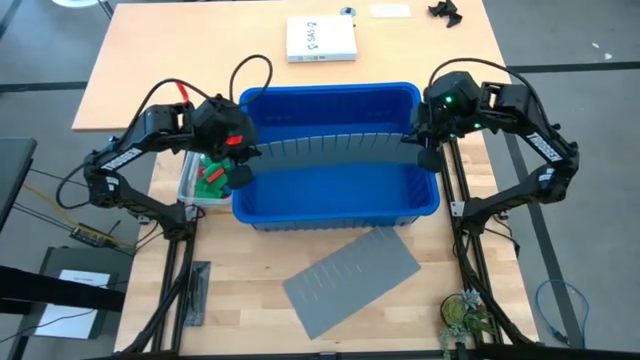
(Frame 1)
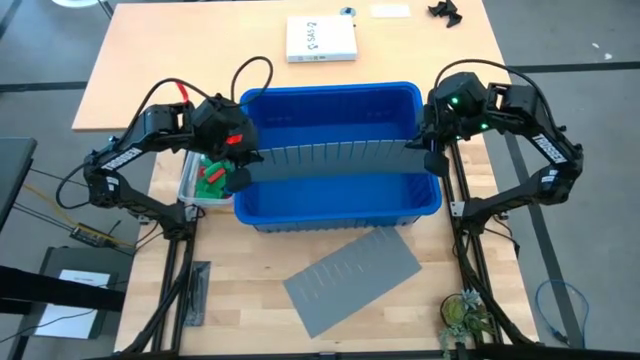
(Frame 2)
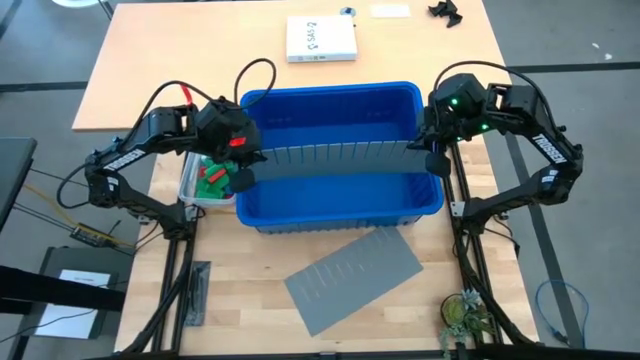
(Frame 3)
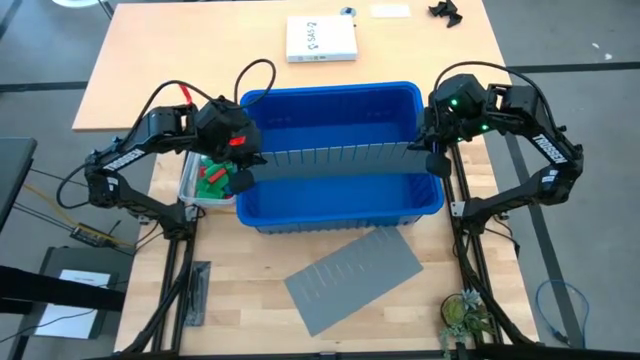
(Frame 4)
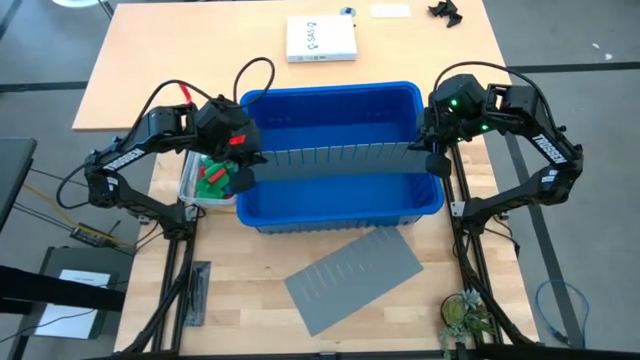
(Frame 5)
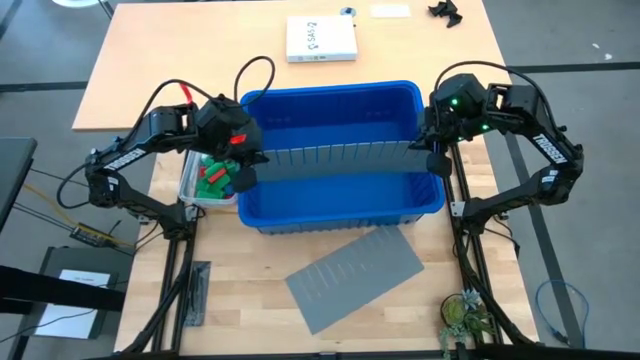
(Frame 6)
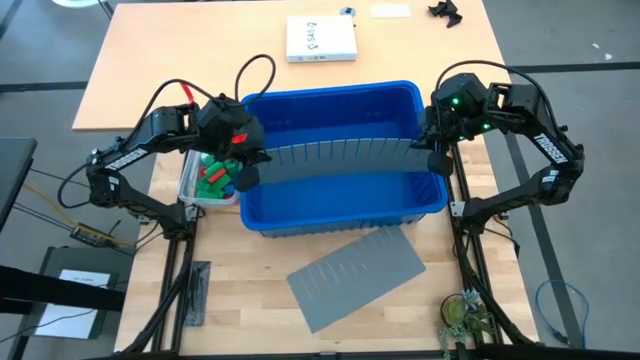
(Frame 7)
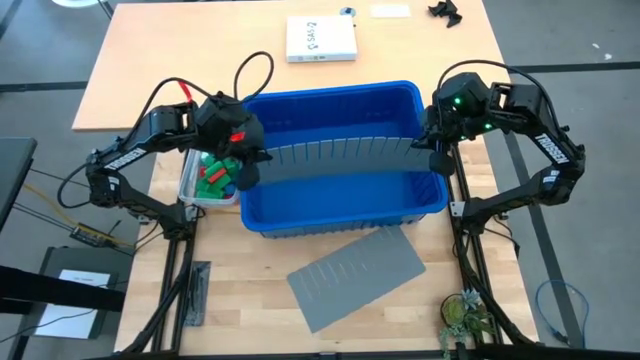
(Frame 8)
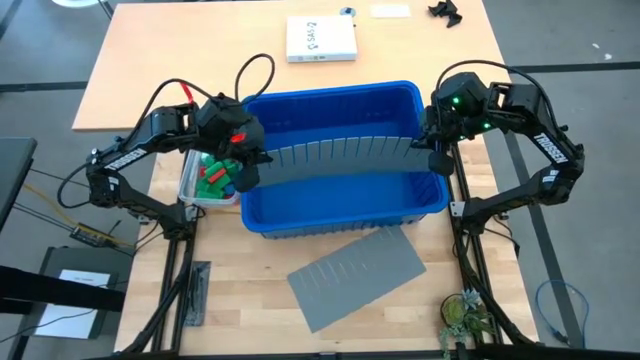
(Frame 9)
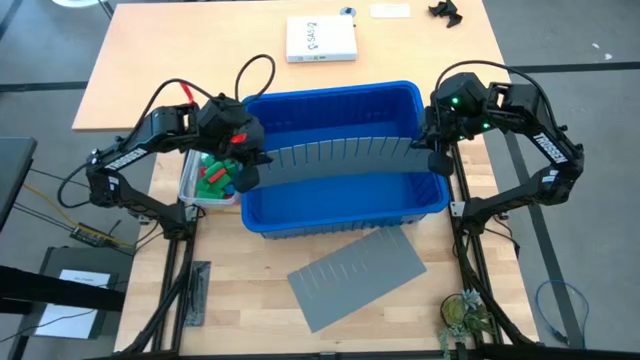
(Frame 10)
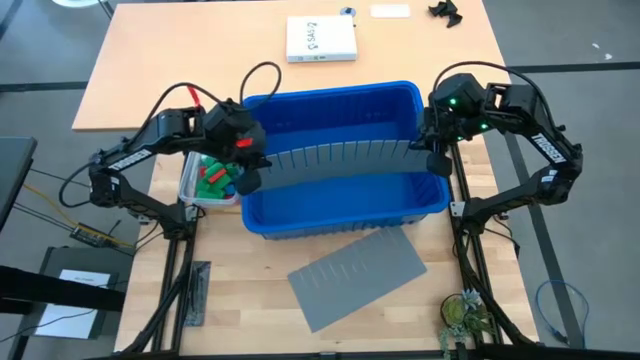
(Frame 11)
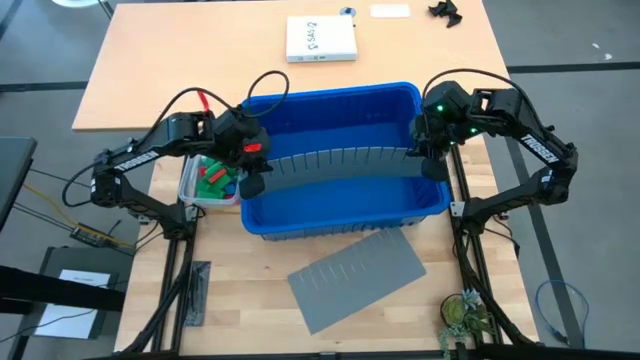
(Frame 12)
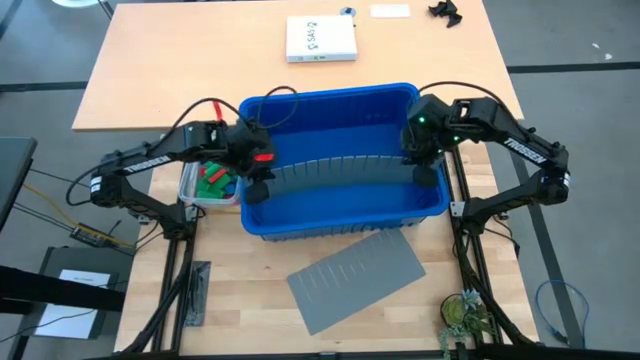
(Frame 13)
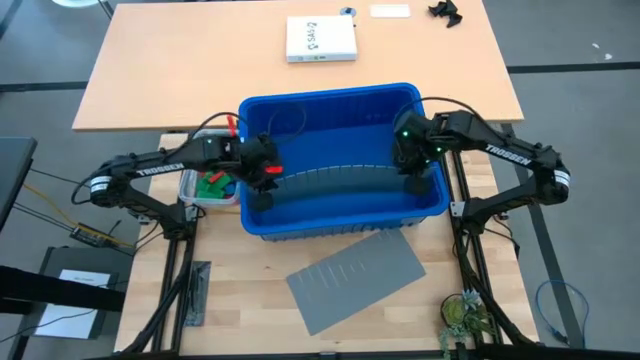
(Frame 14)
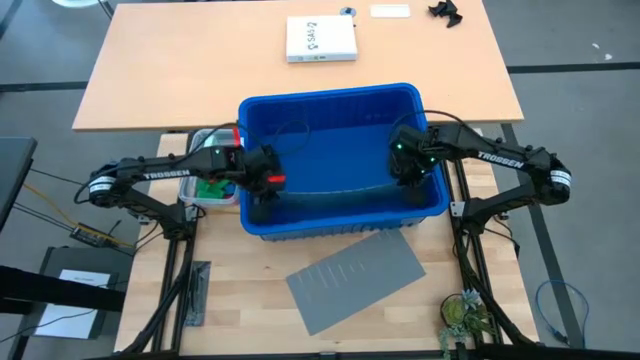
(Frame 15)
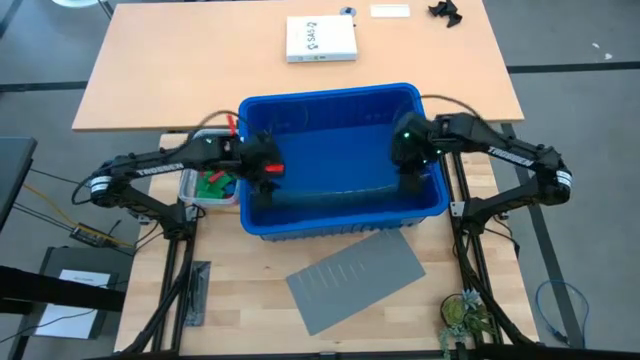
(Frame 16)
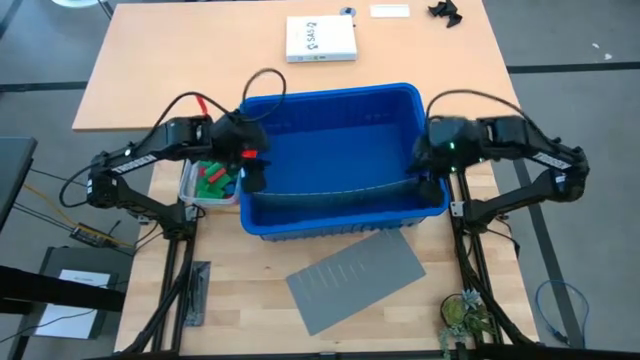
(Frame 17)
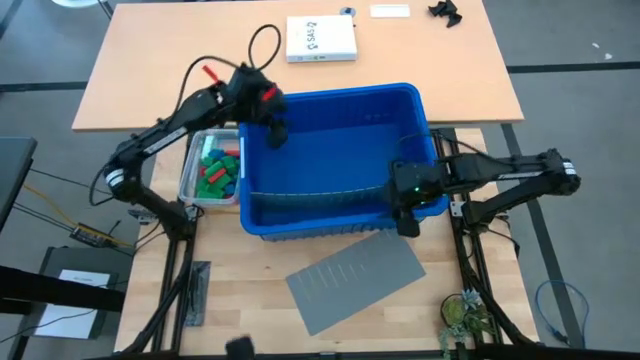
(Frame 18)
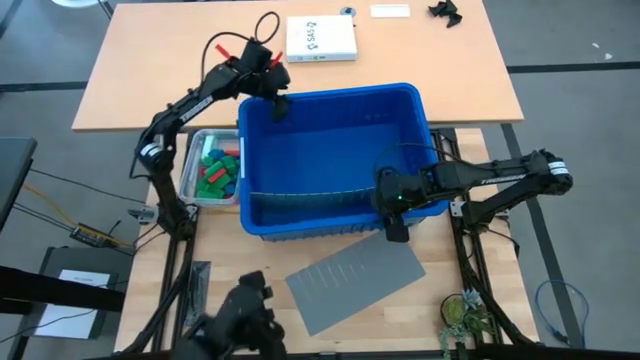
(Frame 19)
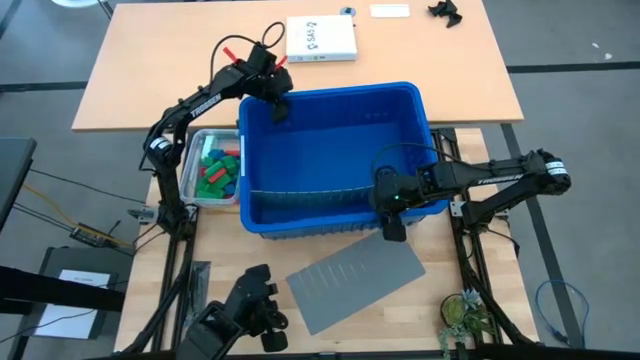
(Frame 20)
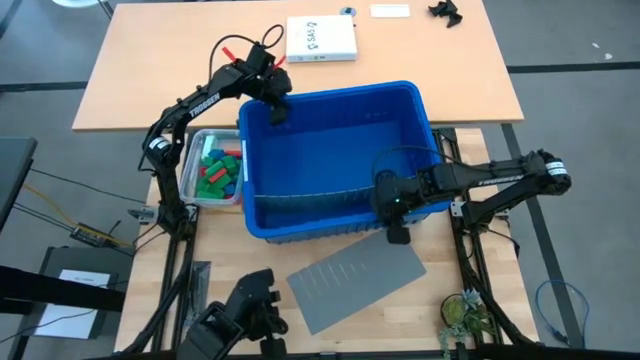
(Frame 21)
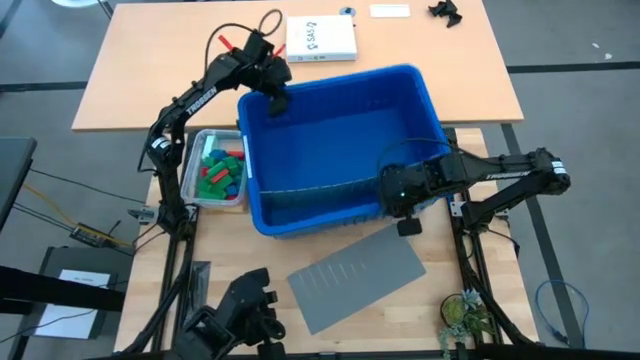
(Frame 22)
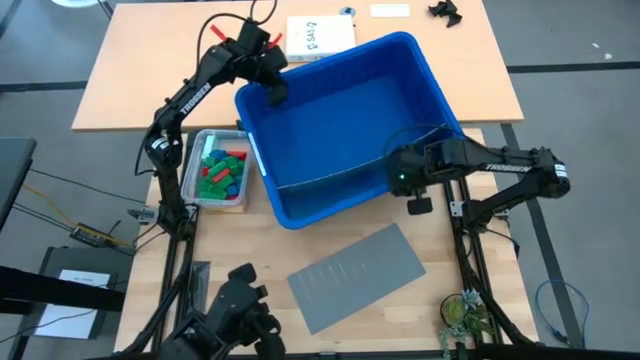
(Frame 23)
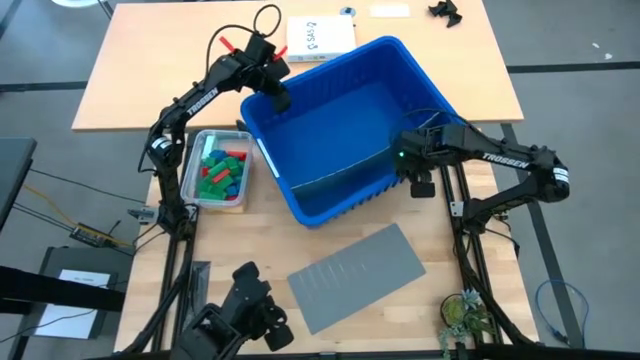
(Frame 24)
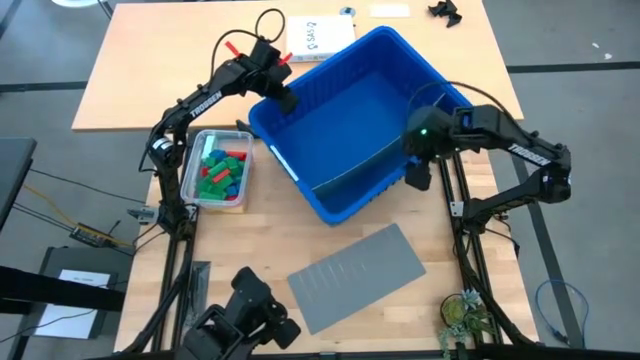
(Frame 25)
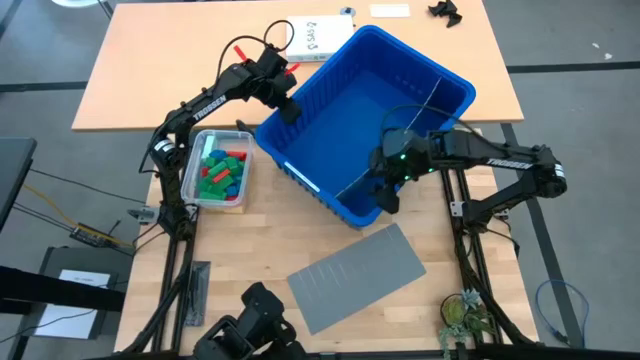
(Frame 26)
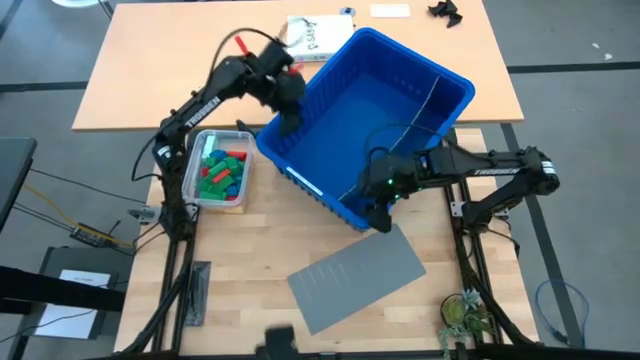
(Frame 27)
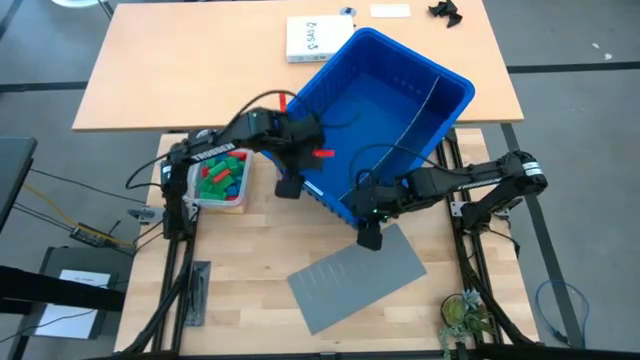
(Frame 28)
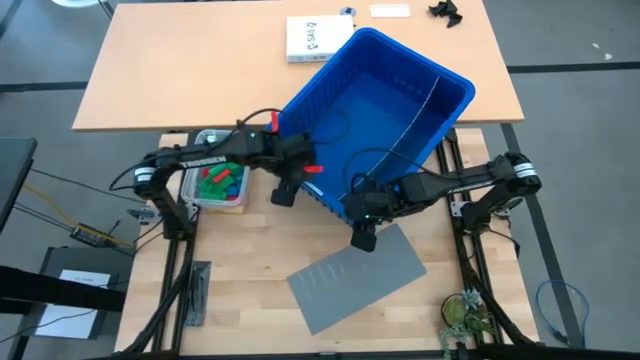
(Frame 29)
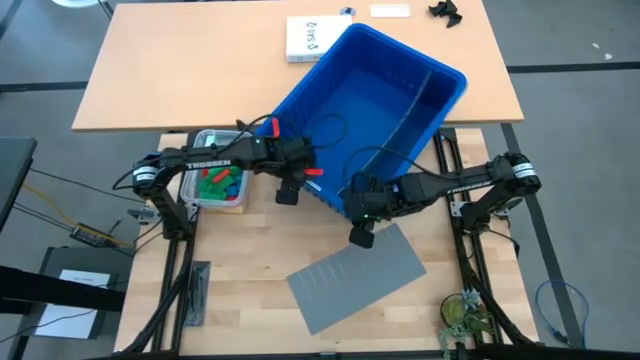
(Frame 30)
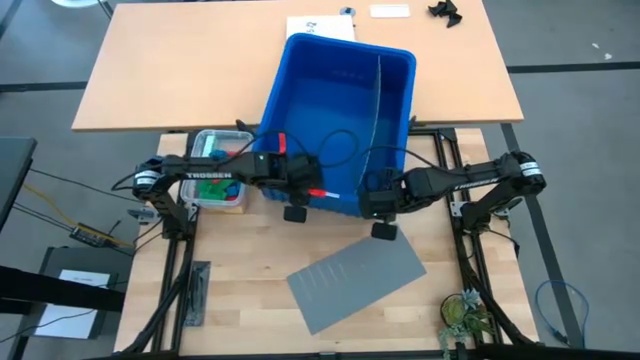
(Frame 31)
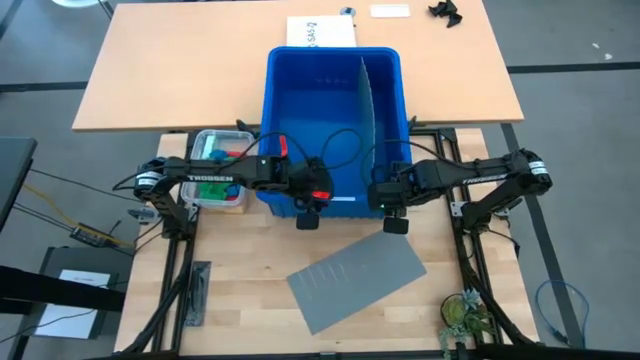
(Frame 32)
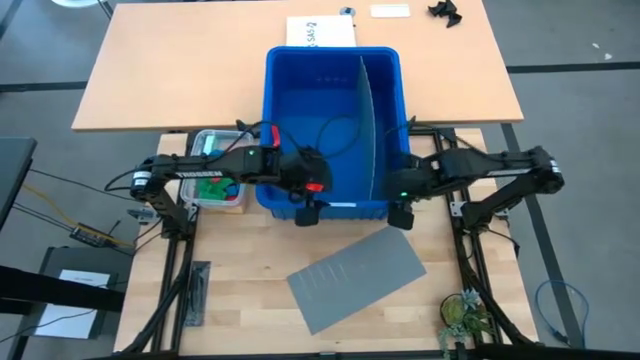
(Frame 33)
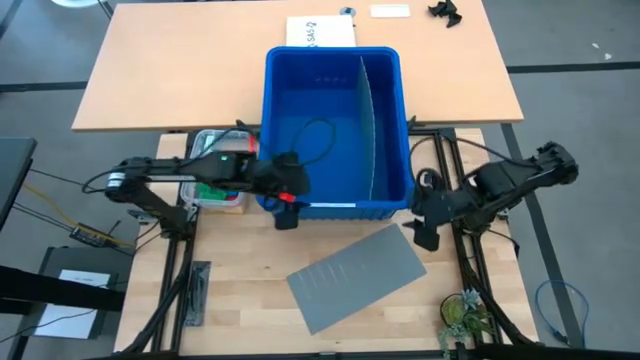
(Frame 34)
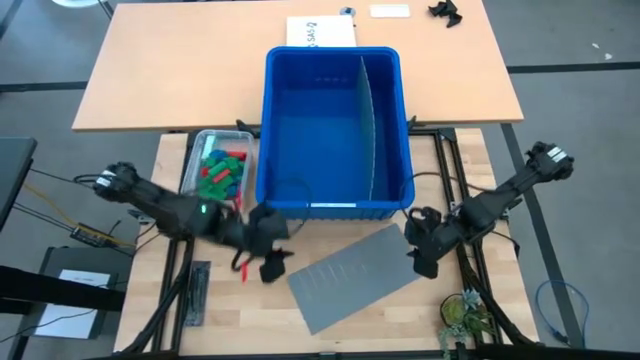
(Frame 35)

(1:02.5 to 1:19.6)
Task: Sort blocks
Assemble the blue bin using bin divider
